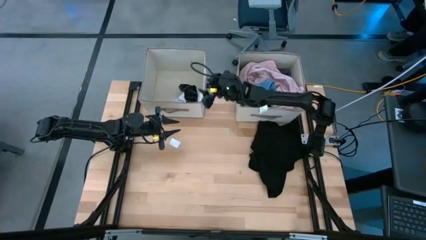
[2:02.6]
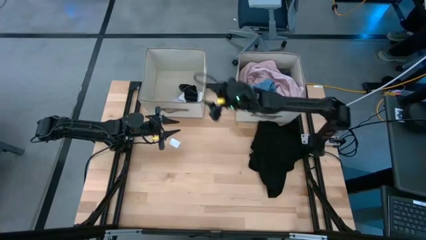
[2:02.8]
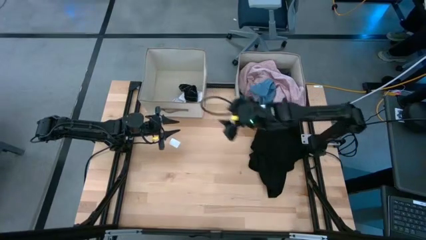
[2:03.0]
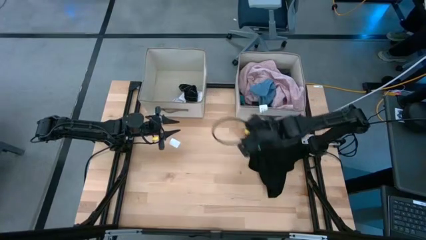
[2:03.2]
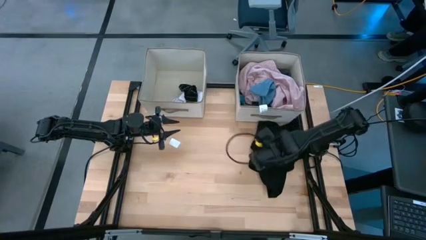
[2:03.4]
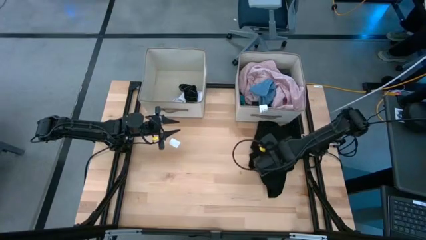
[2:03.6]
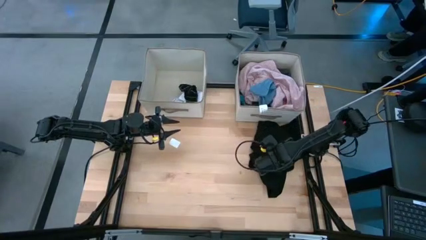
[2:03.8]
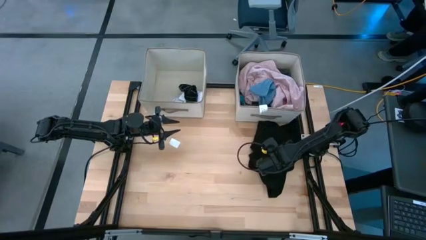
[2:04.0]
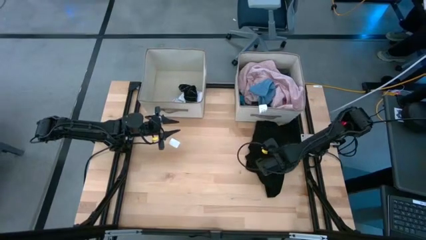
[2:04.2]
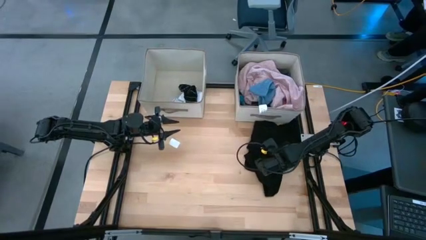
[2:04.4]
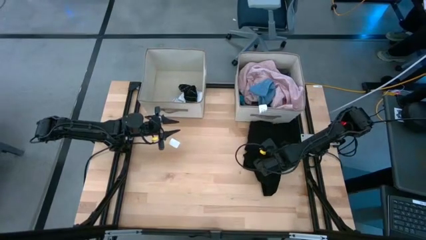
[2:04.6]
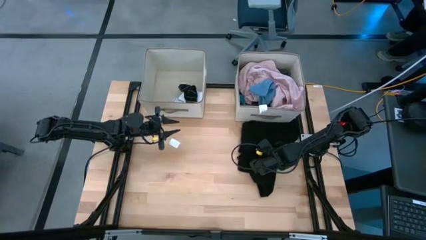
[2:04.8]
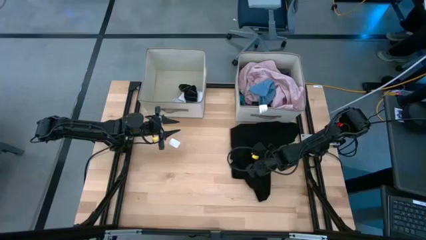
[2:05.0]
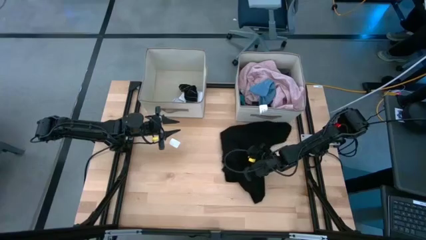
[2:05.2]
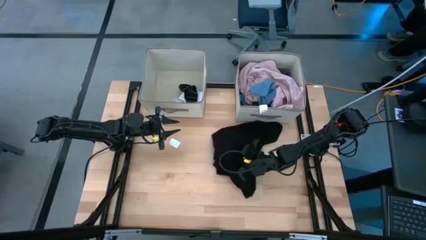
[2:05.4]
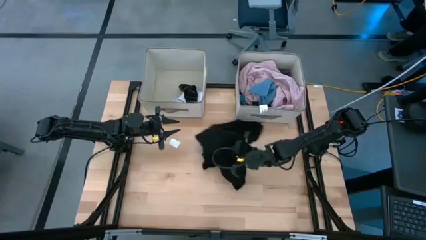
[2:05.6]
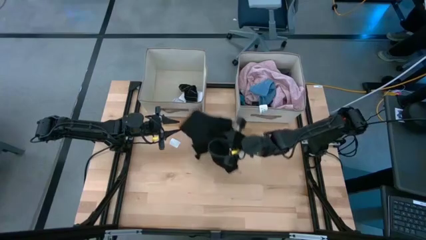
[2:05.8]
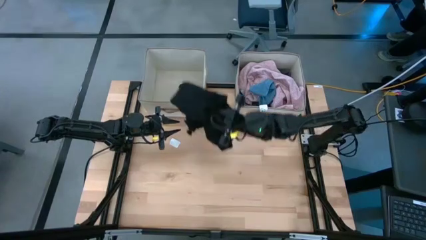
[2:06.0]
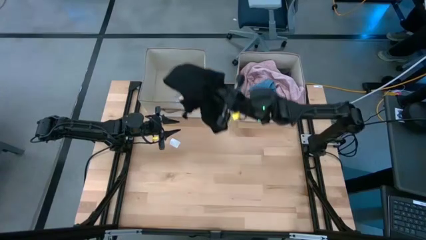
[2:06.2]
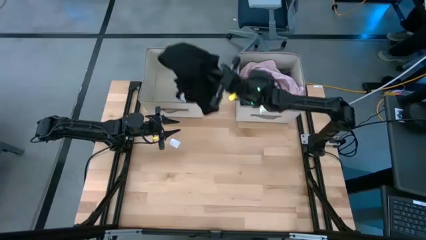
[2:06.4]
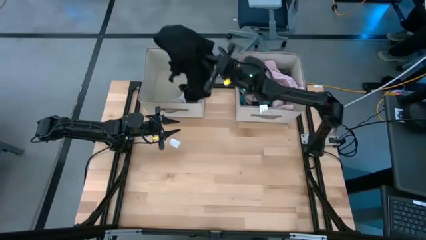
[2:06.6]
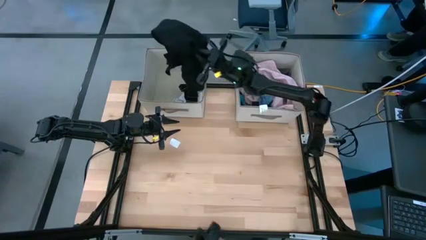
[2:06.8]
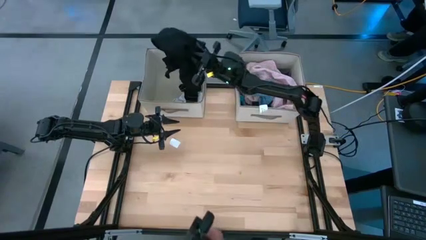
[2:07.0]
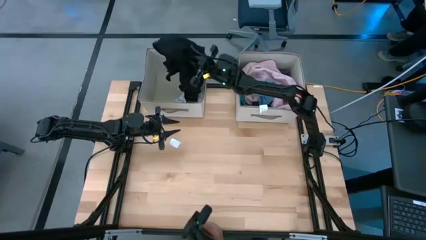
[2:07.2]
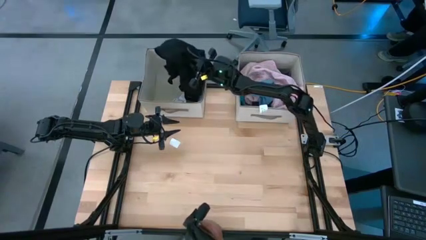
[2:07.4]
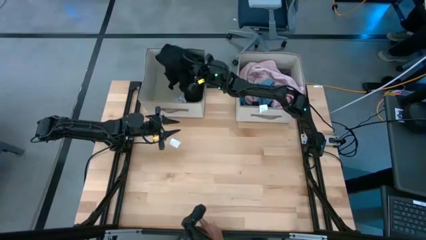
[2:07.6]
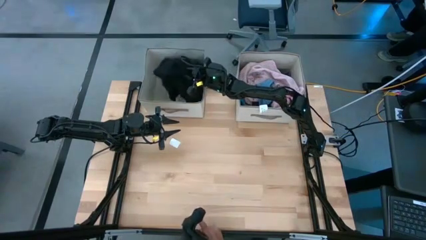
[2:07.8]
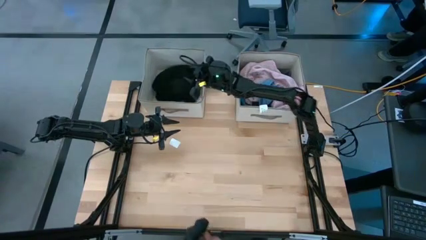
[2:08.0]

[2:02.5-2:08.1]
Task: Sort clothes
Put the black shirt into the left laundry organizer

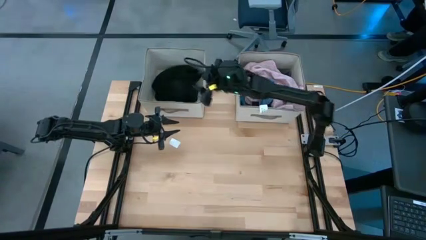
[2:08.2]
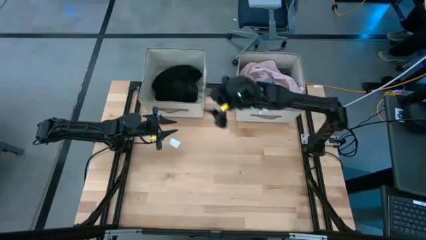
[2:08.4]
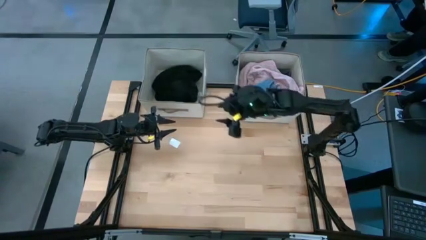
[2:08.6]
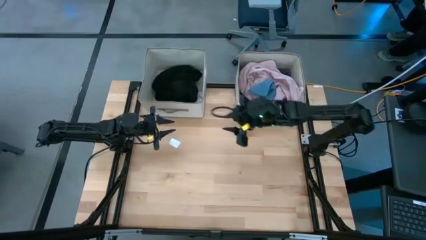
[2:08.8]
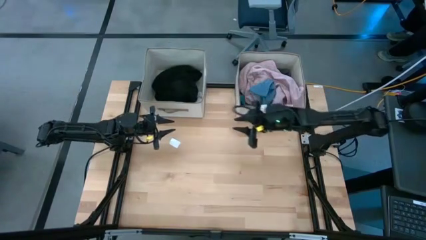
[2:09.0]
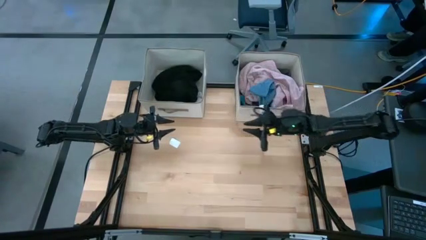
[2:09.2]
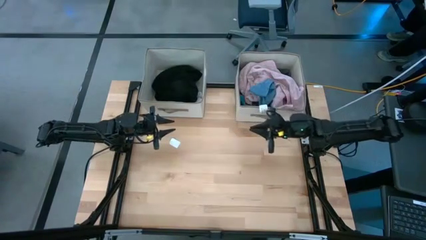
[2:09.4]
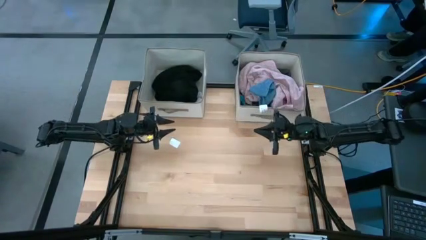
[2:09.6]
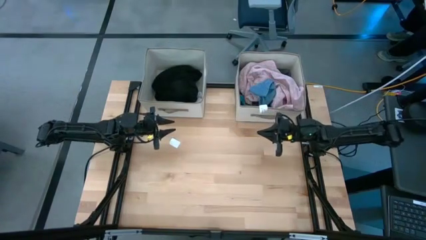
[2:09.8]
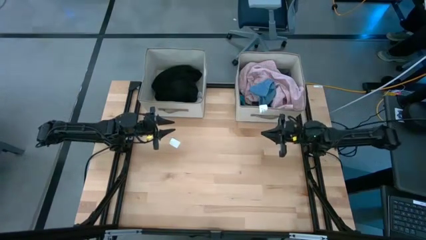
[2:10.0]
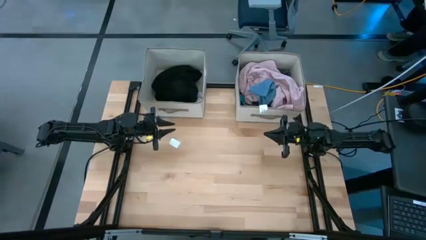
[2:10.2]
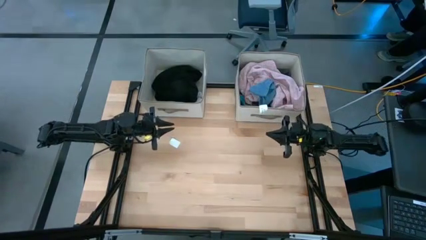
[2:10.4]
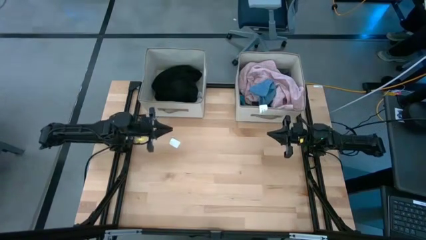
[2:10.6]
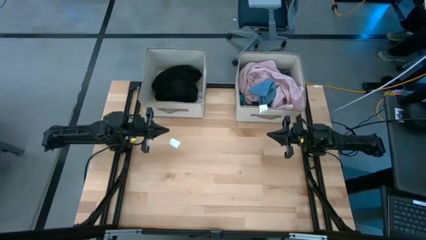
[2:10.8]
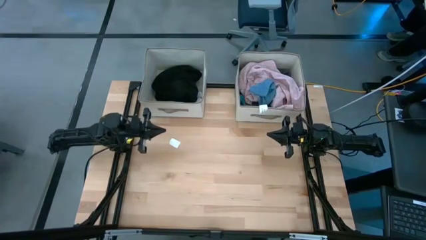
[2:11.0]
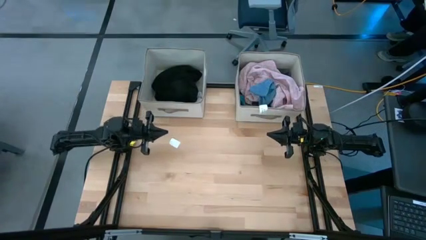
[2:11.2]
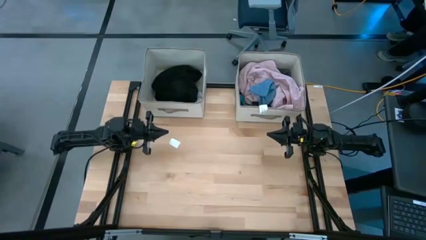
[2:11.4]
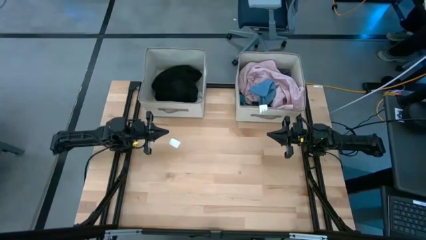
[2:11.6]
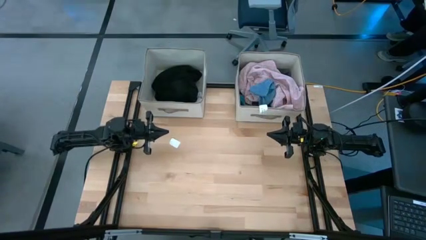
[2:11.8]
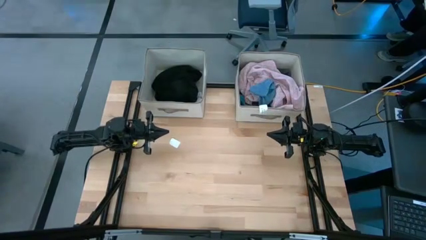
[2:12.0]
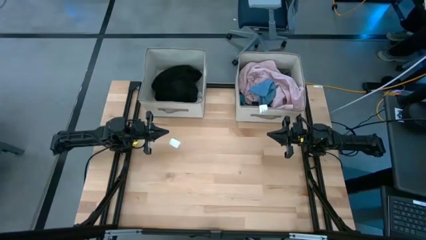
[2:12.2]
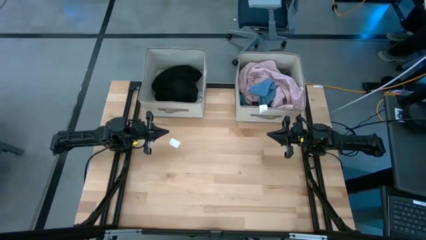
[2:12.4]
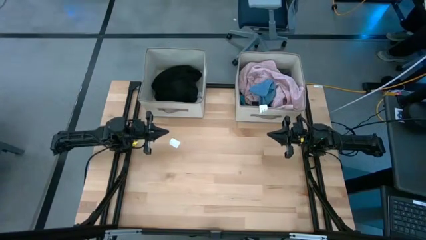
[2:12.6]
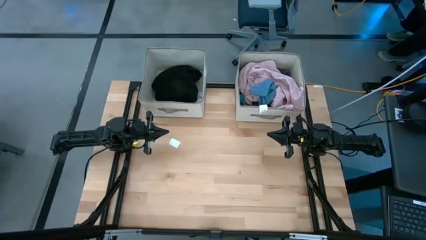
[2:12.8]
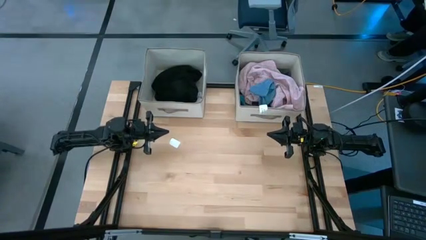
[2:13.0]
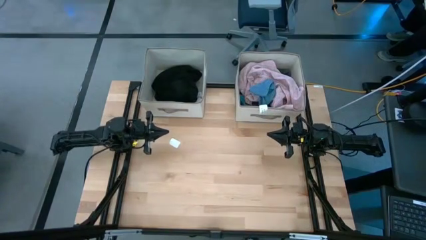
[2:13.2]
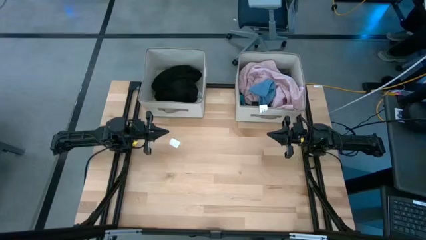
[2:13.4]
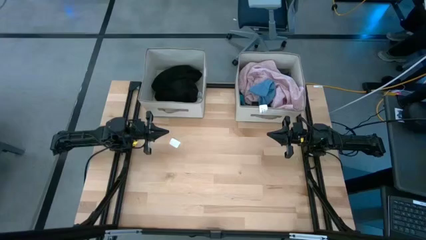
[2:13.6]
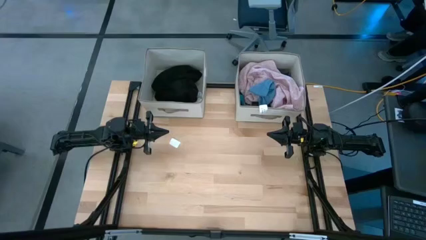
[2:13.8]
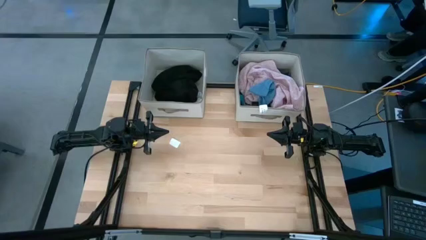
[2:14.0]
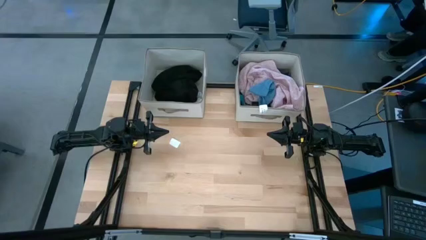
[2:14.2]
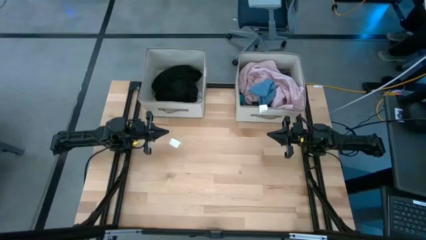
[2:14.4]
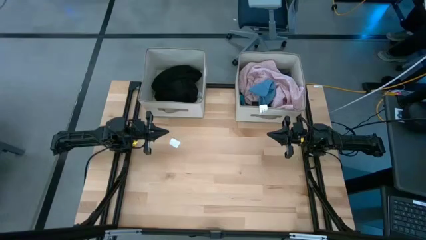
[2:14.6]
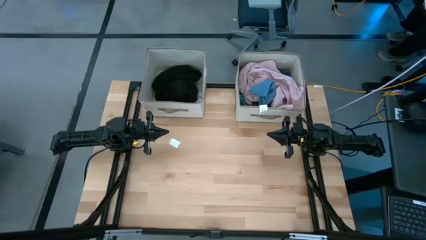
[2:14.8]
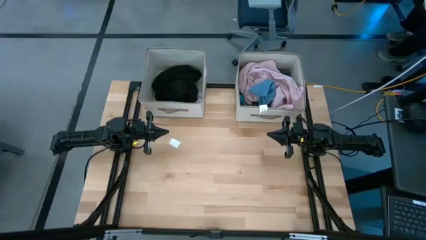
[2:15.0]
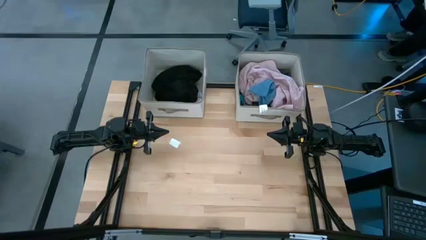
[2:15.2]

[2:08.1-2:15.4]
Return to Home Position
